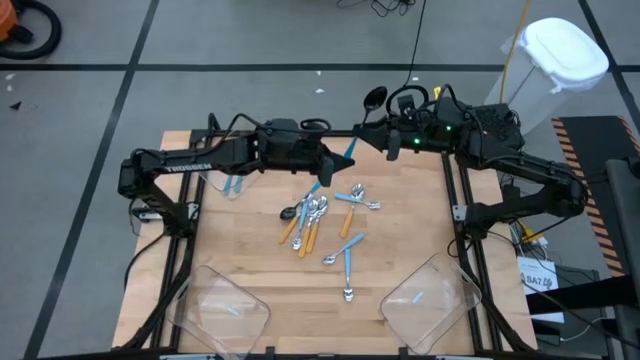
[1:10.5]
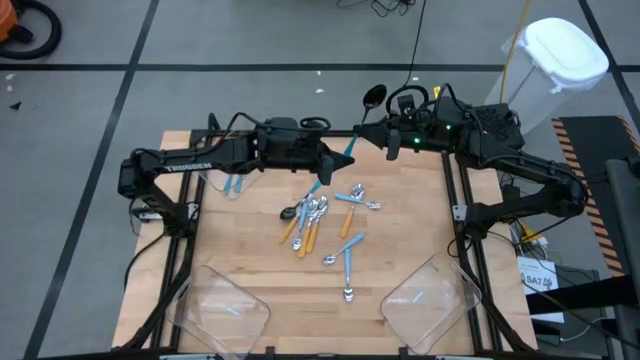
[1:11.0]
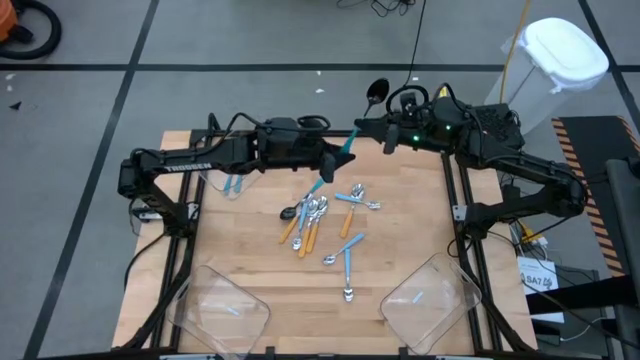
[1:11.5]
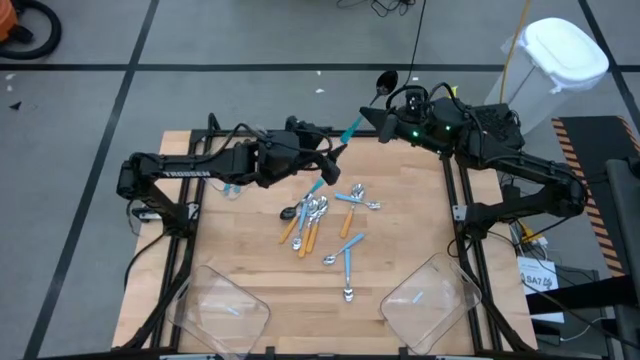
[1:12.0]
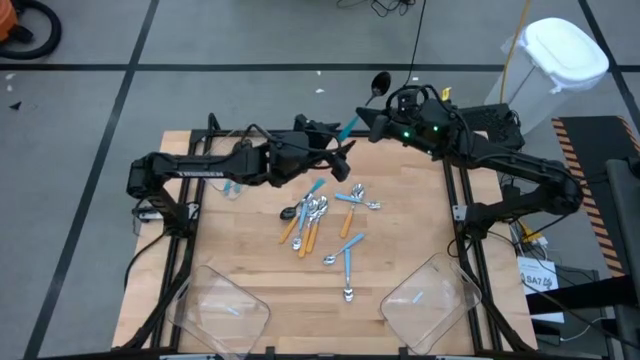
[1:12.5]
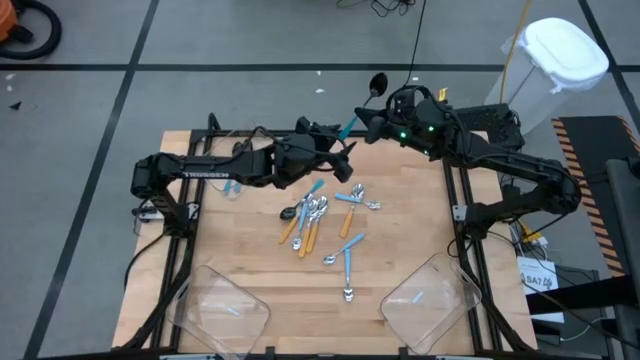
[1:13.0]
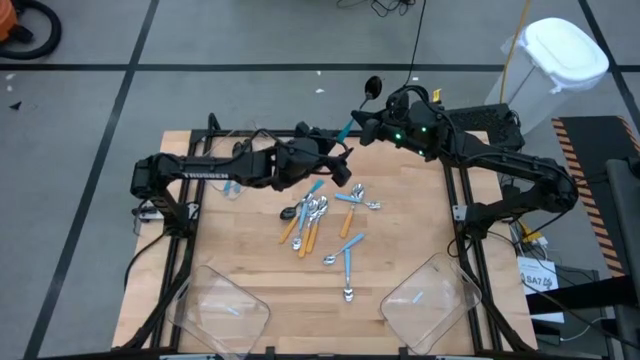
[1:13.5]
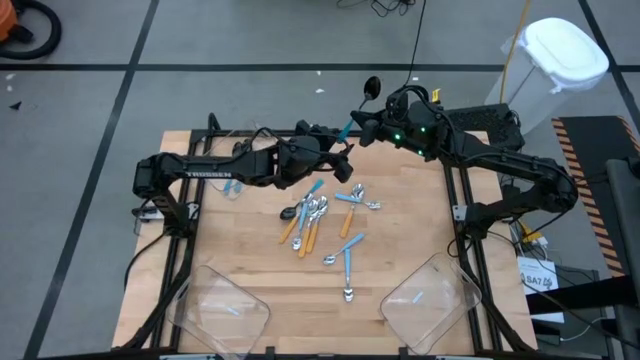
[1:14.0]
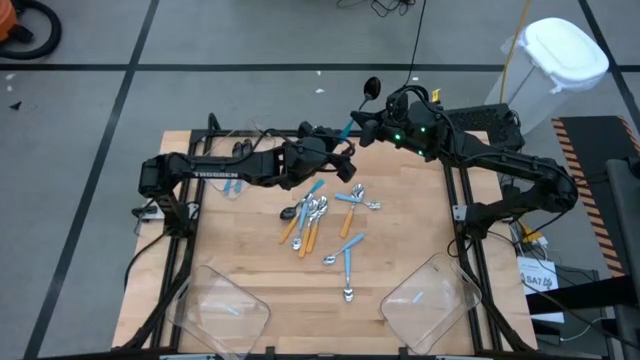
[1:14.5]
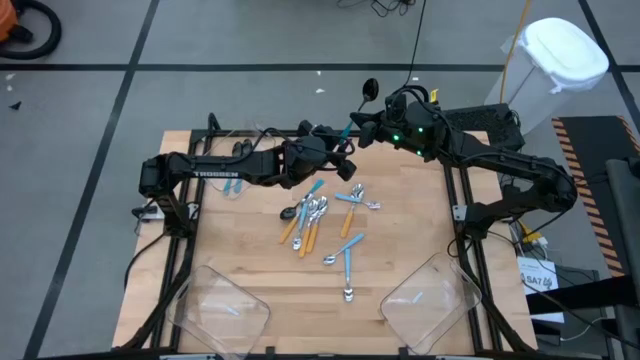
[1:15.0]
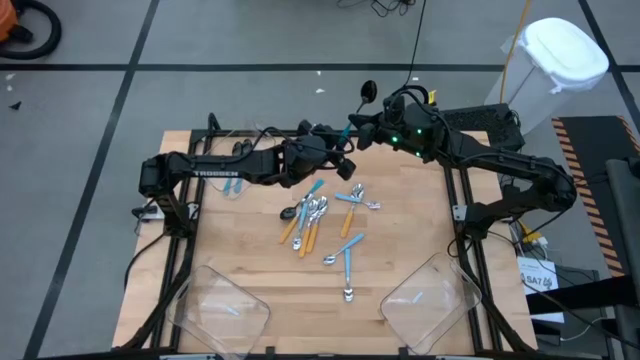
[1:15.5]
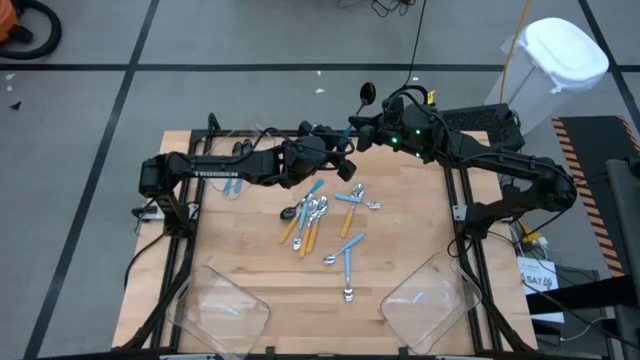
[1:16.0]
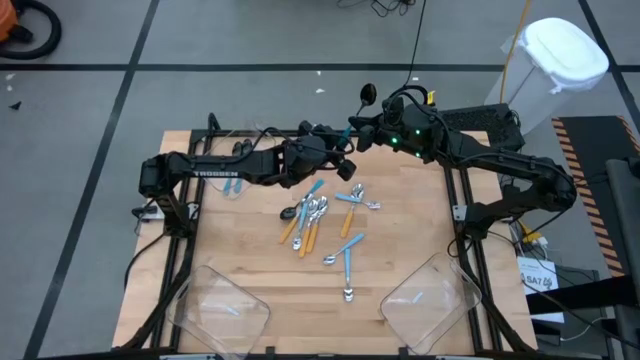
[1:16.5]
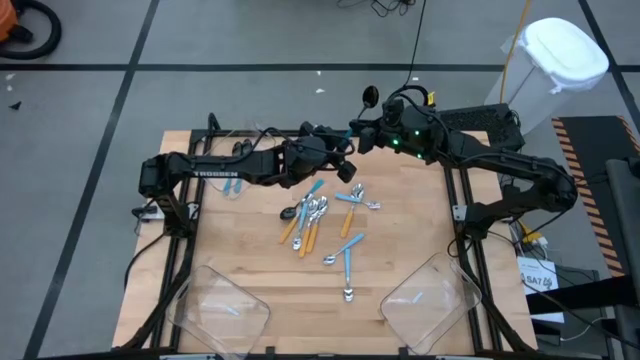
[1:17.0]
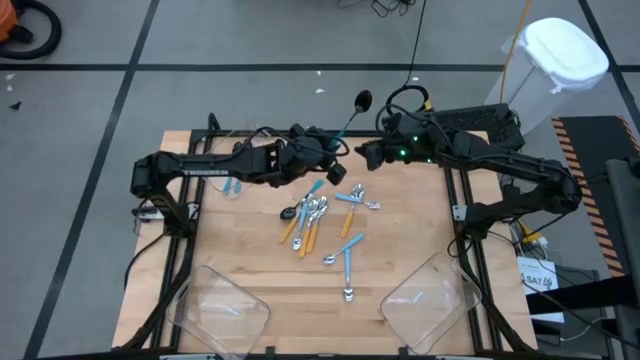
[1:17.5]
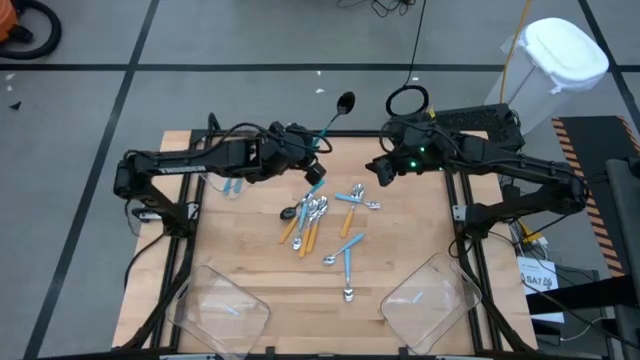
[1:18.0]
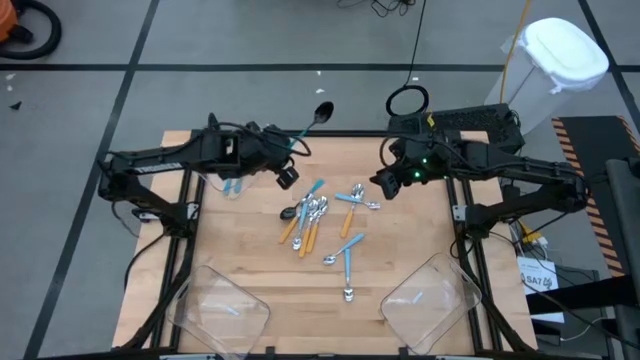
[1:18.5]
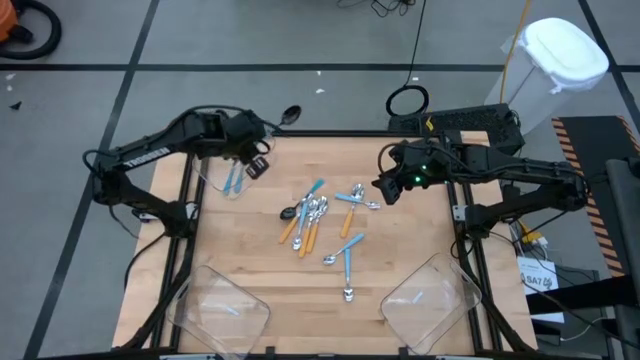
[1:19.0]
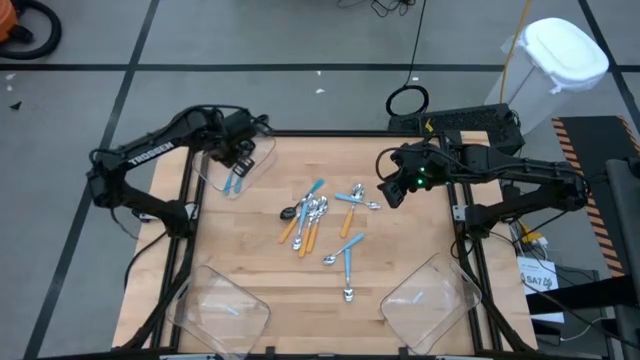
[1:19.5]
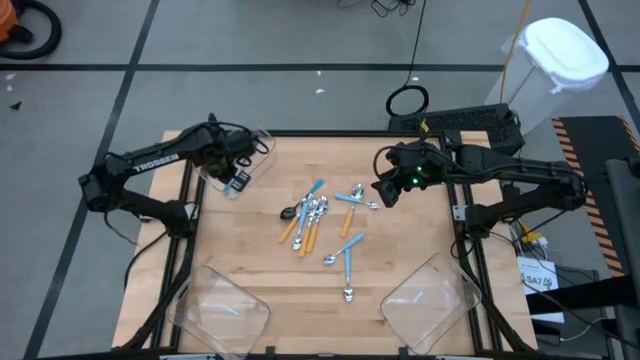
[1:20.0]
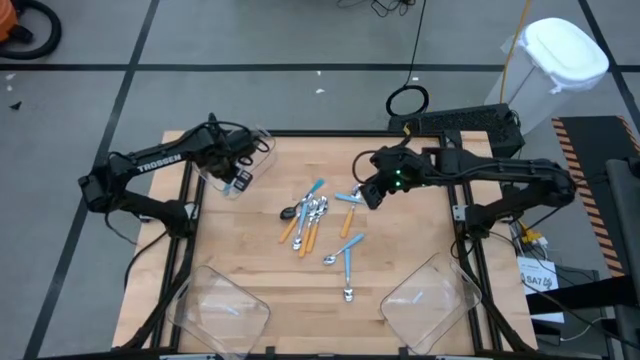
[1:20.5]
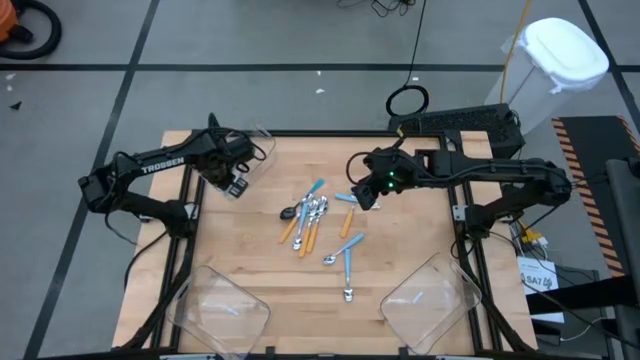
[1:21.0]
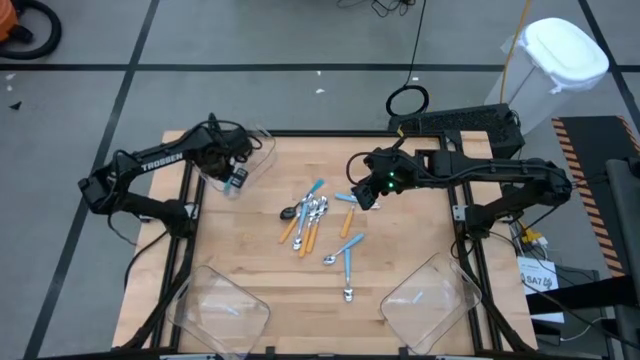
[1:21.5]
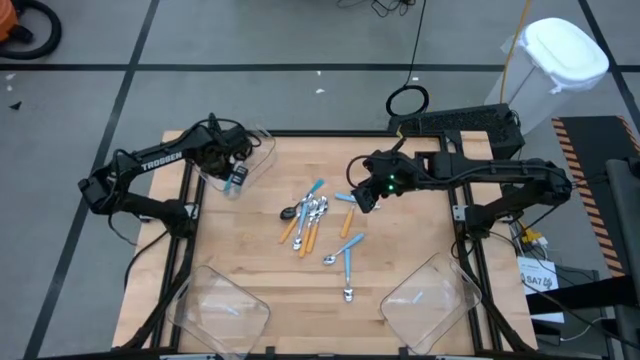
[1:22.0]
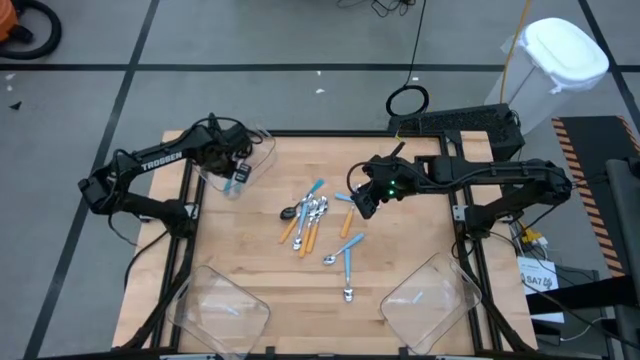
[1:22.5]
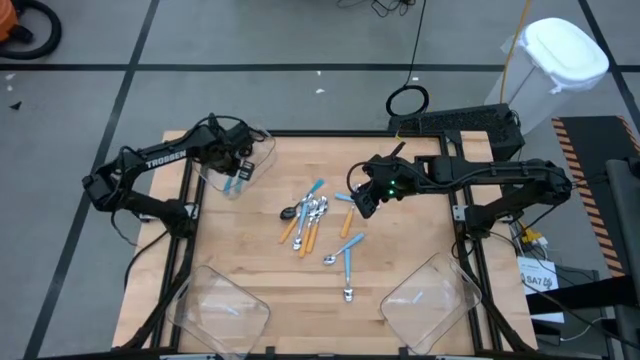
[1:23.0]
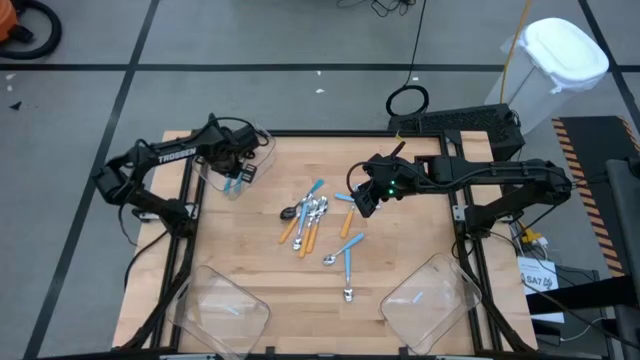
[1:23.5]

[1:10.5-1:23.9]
Task: Sort silverware by color (type)
Put the blue spoon into the top left transparent bin

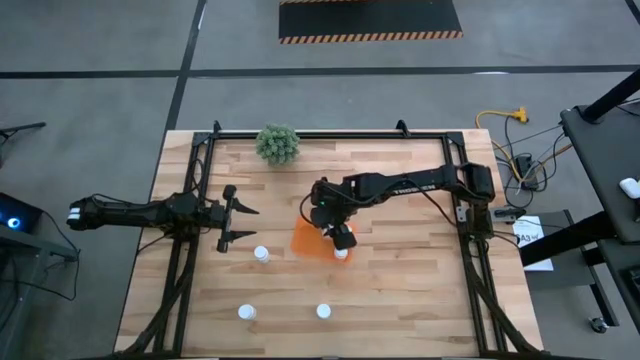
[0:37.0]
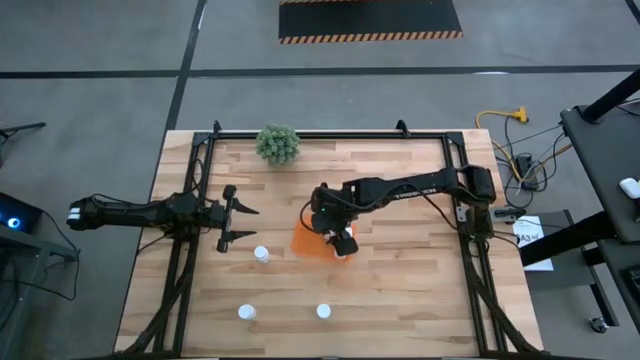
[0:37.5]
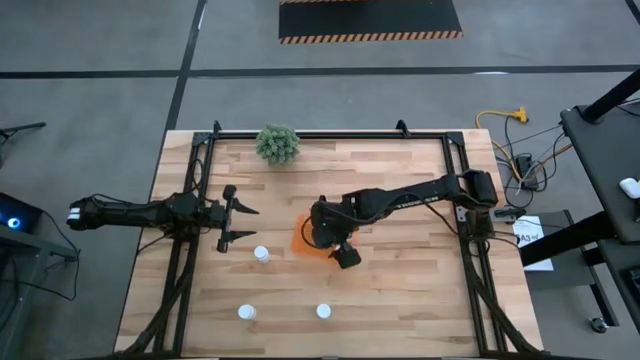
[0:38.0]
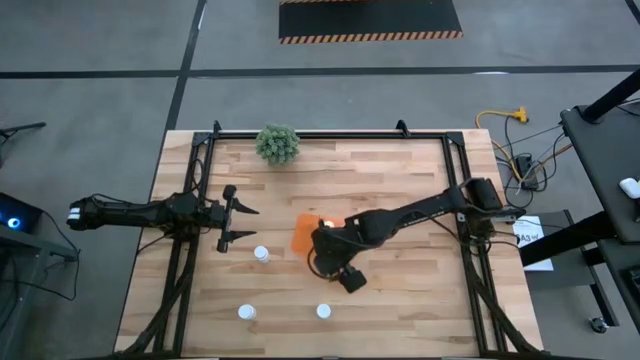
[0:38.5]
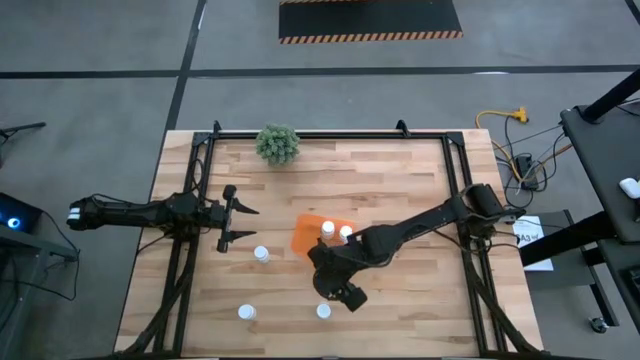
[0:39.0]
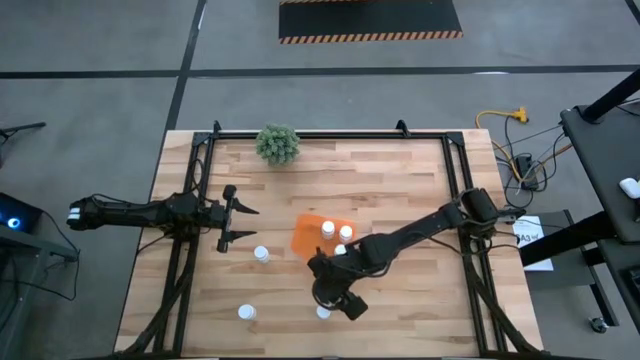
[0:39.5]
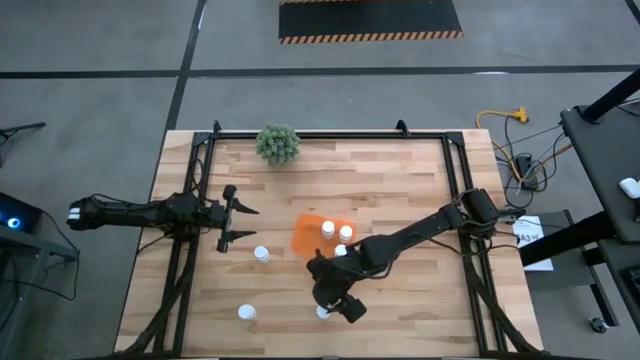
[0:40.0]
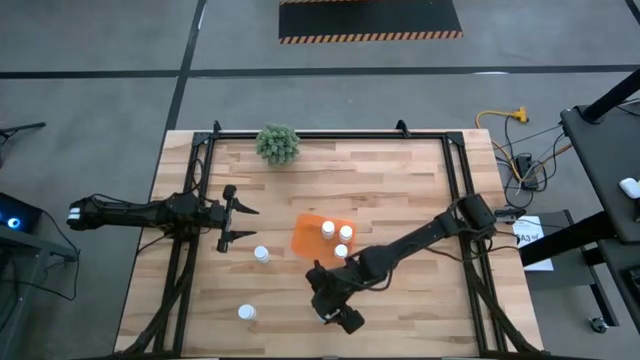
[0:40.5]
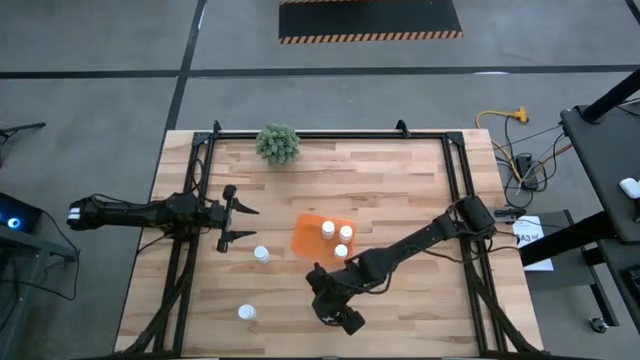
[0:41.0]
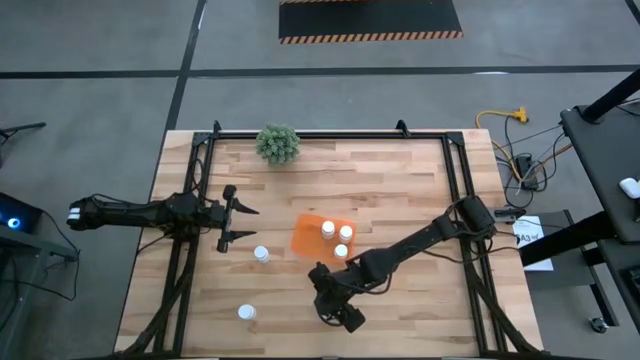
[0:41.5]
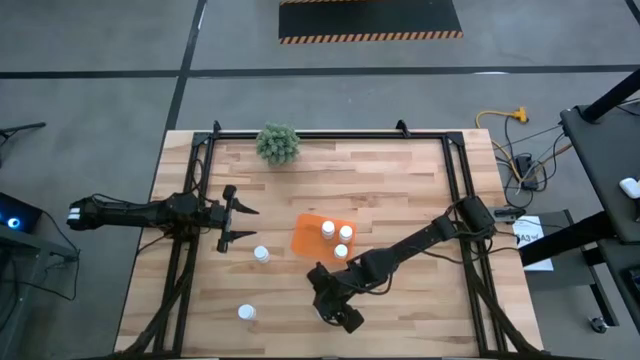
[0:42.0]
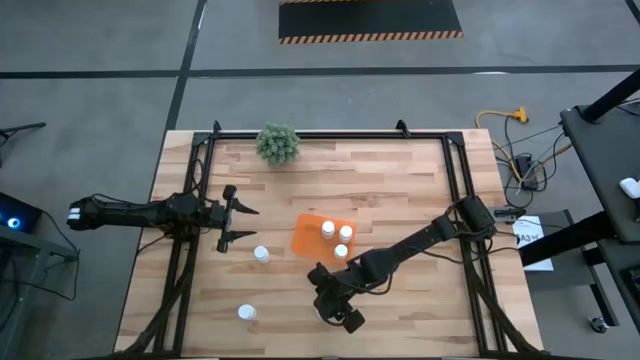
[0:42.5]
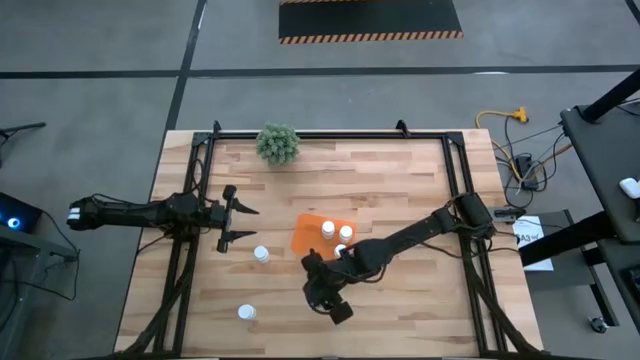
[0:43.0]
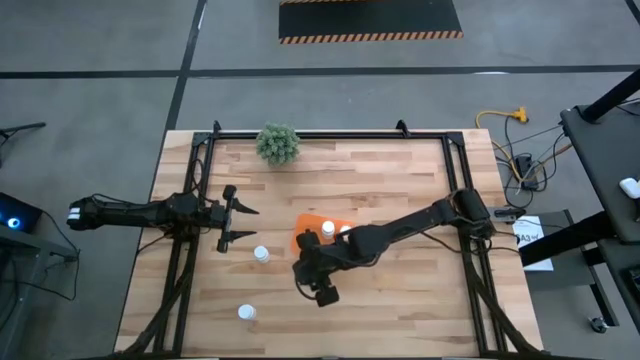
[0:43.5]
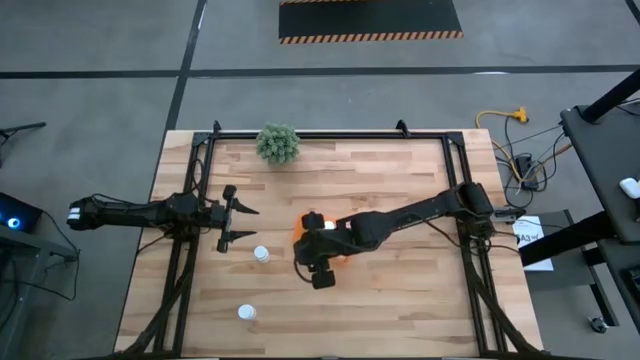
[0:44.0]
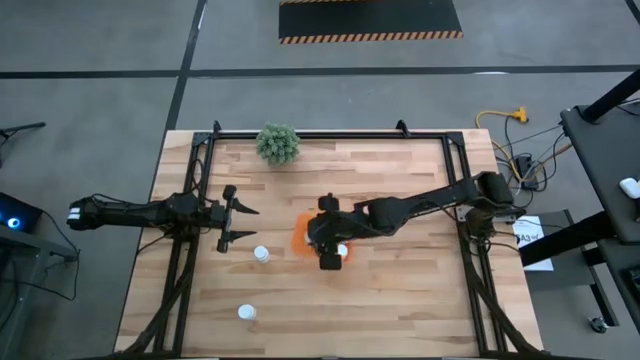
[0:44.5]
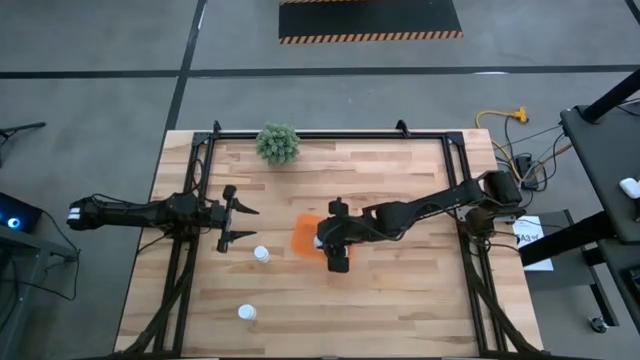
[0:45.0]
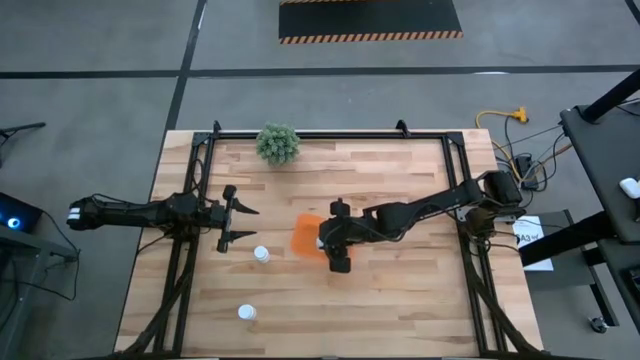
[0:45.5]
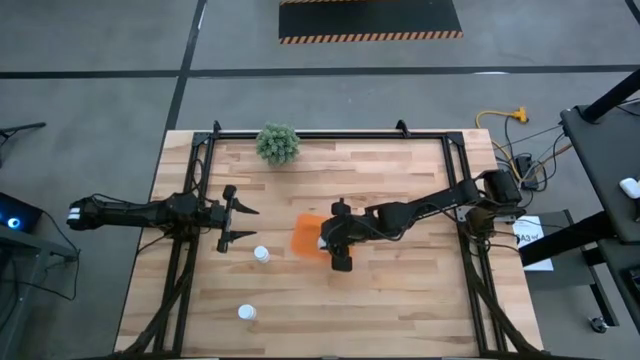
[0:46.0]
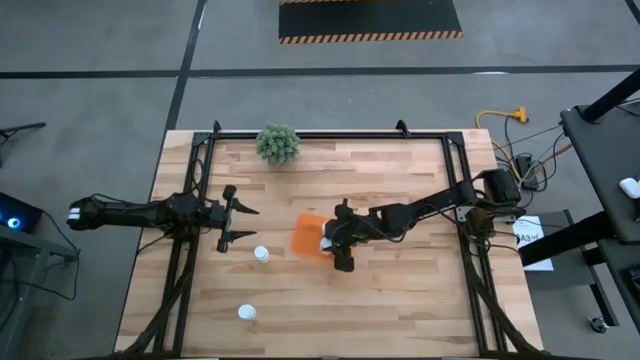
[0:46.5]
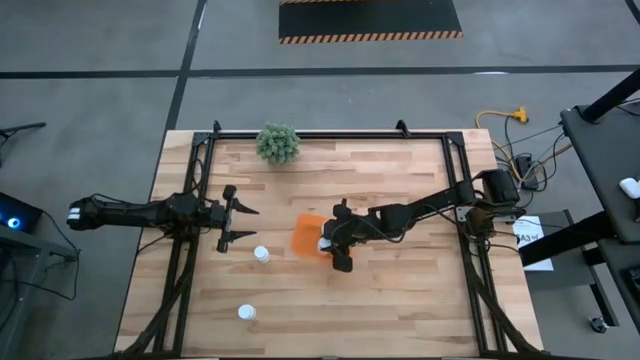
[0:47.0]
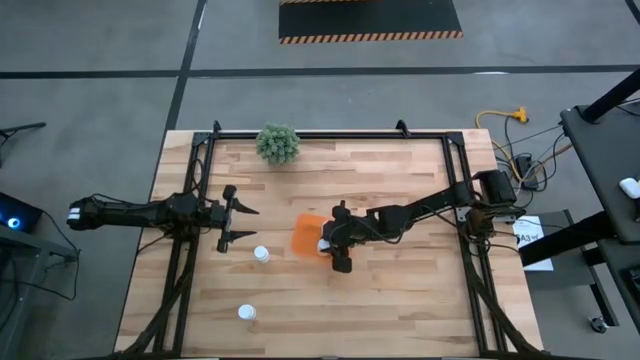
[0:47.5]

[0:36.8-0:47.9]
Task: Pick and place pill bottles into a basket
Put the right pill bottle into the bin
